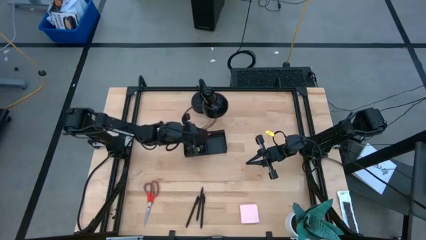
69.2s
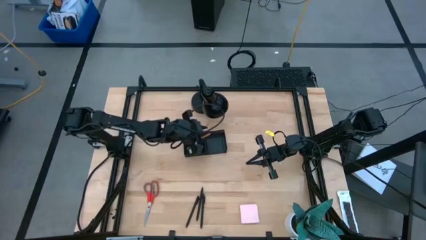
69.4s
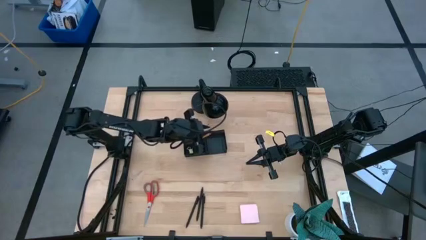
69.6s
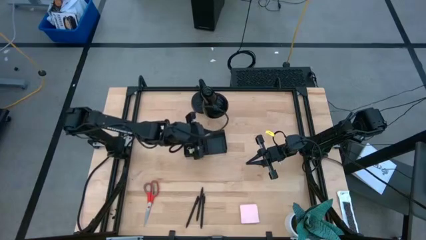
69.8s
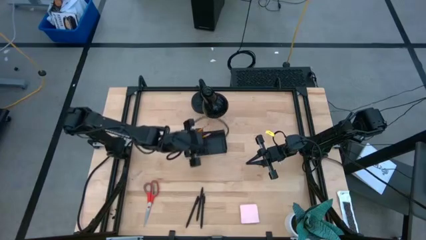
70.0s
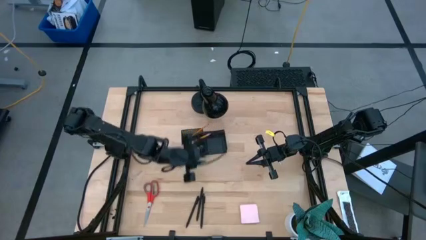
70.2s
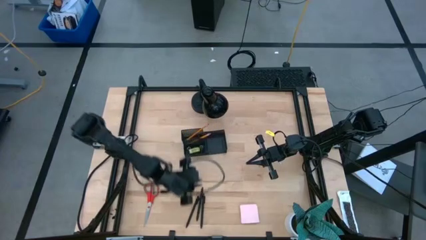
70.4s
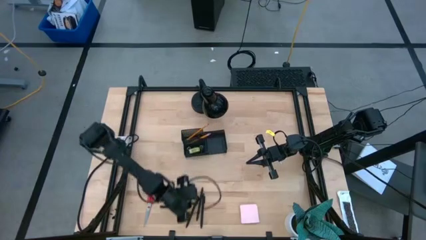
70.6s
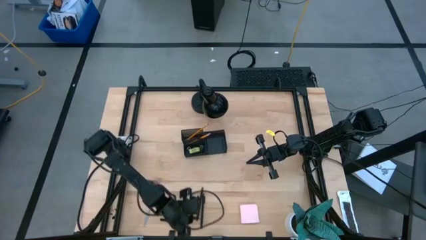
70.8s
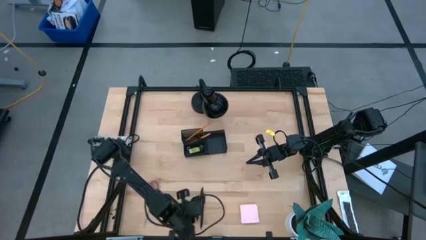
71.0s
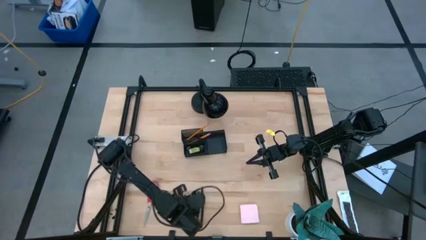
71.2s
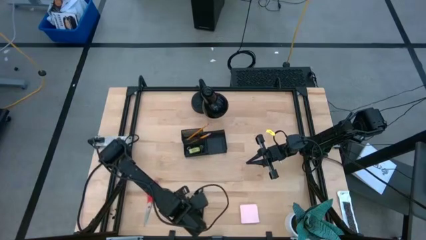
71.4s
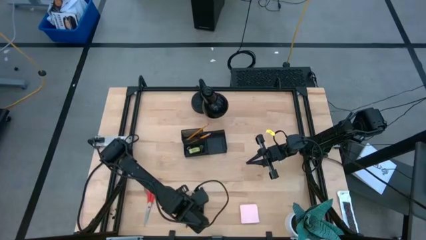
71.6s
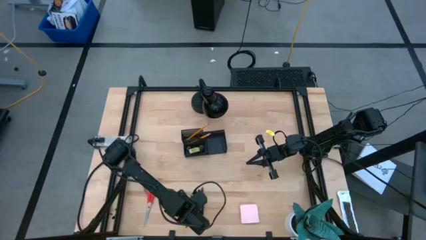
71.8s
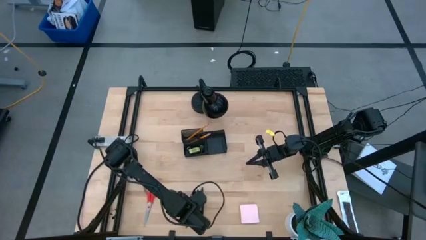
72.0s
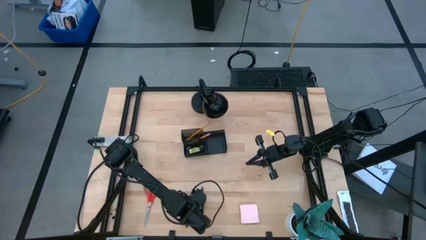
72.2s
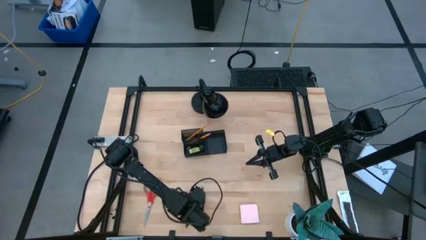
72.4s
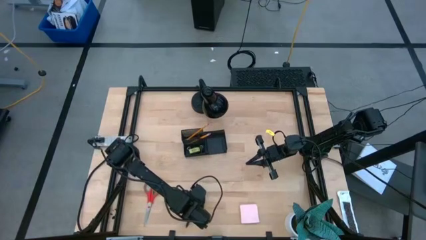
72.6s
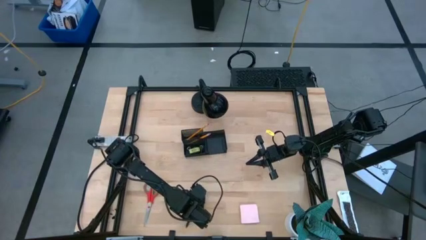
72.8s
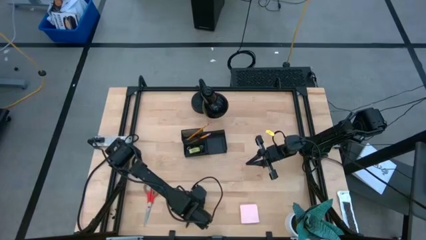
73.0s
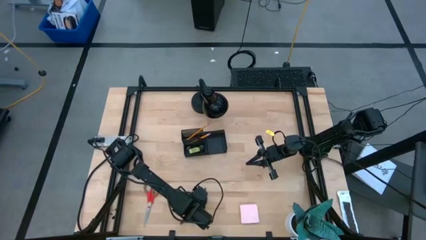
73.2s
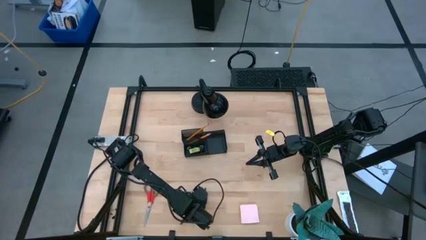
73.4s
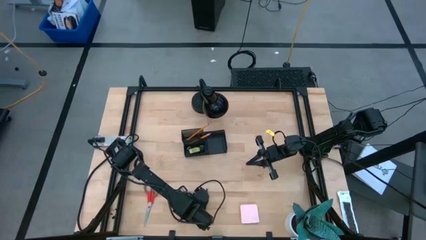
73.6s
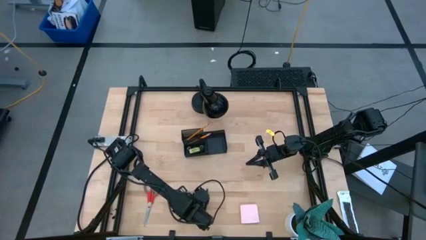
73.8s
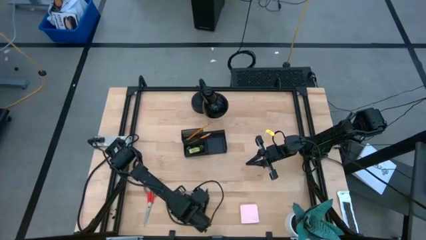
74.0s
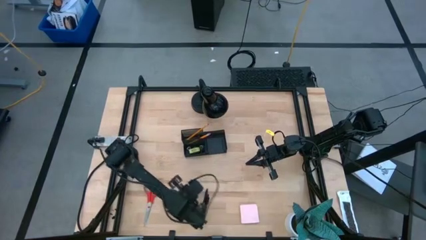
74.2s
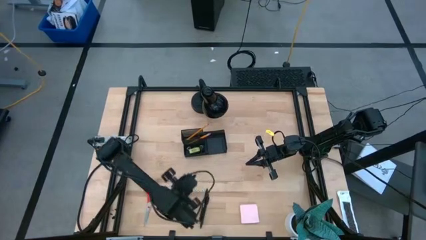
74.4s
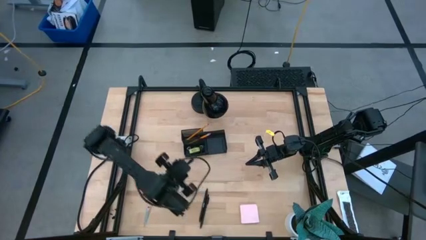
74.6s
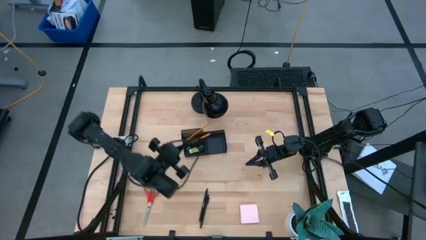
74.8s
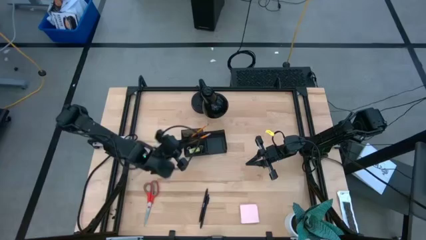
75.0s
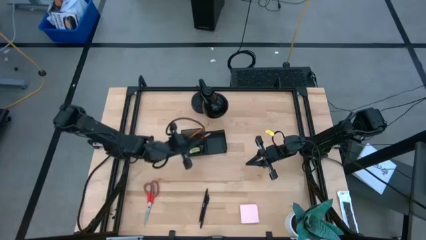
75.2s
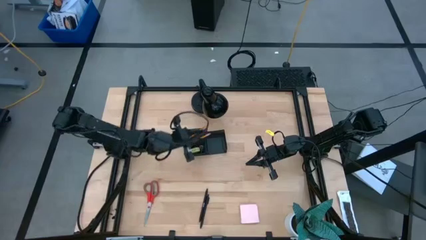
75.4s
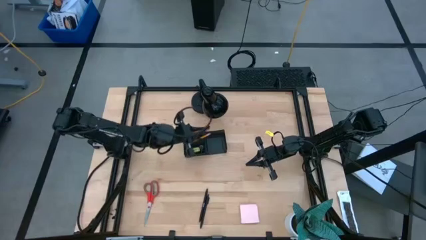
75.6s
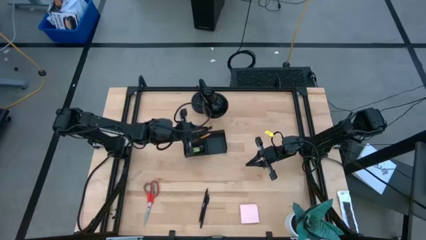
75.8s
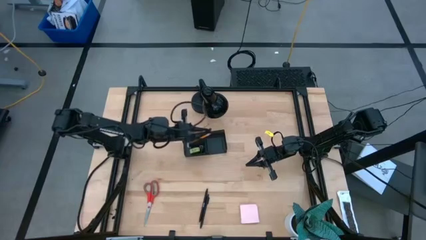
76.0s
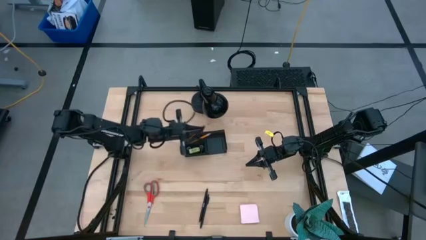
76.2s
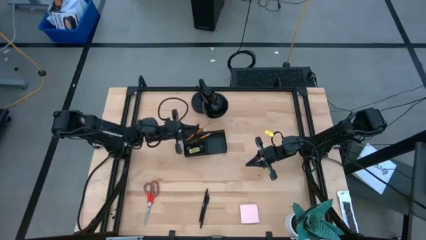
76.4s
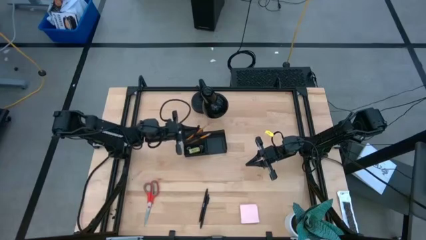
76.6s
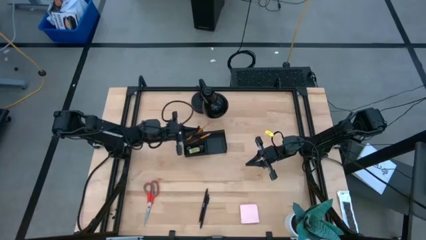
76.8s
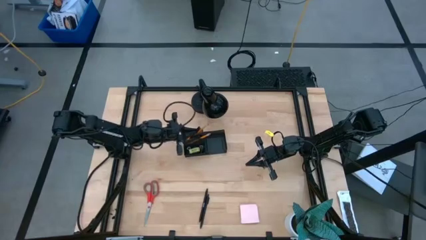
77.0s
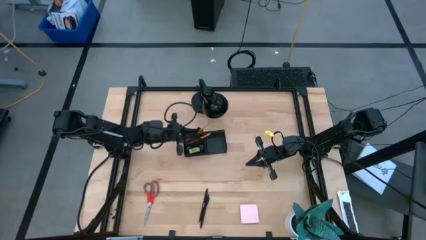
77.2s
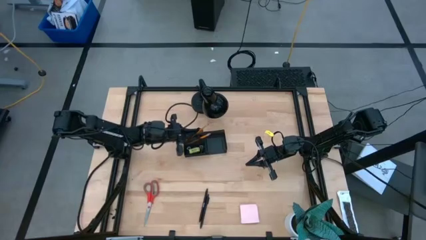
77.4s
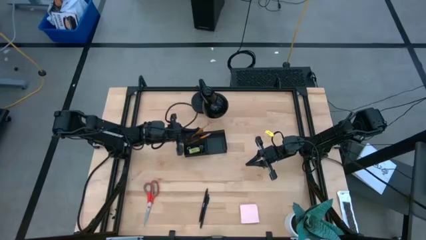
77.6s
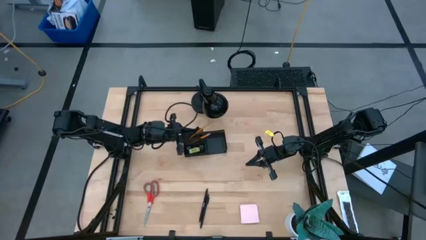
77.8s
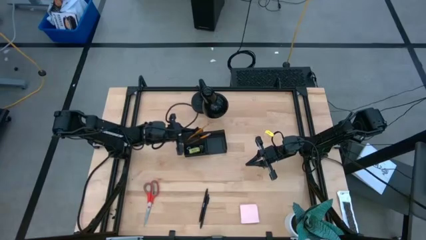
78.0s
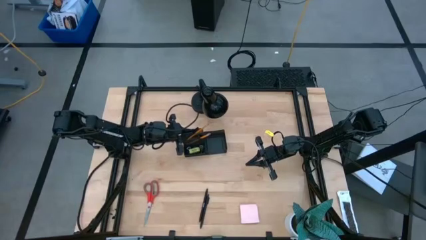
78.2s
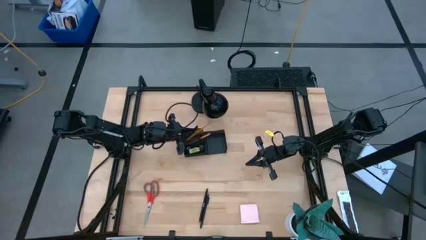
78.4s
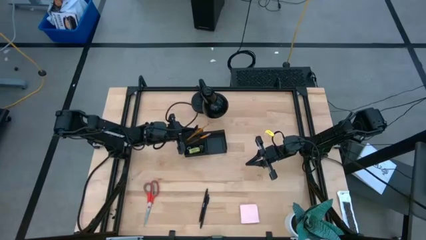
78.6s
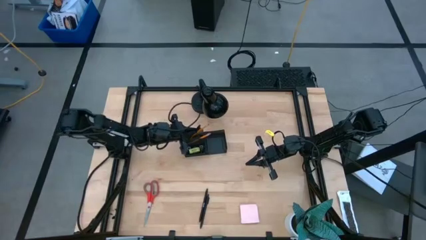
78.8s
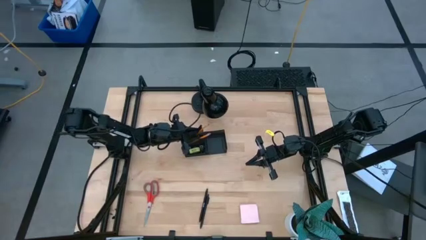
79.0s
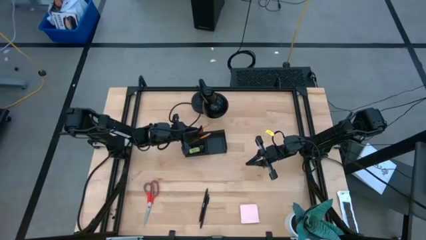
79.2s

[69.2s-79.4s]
Task: Pick and place office supplies into organizer
Put the black pen into the black desk organizer

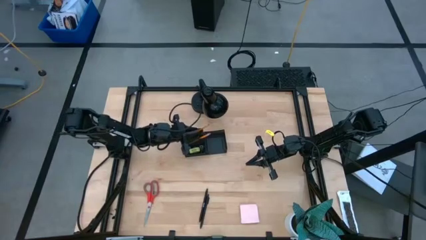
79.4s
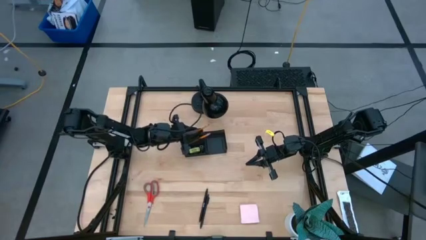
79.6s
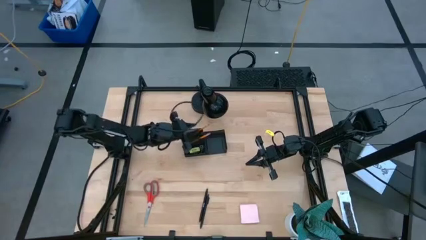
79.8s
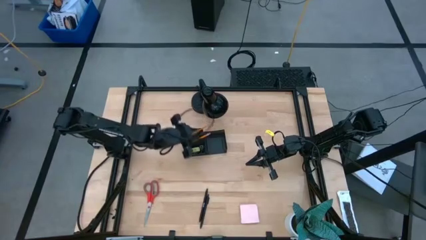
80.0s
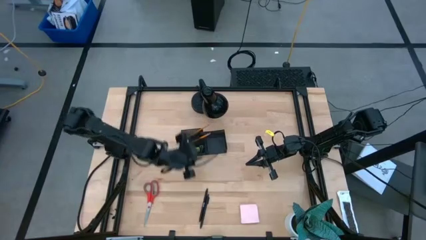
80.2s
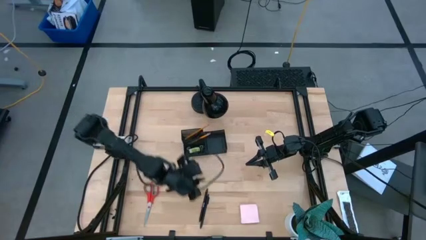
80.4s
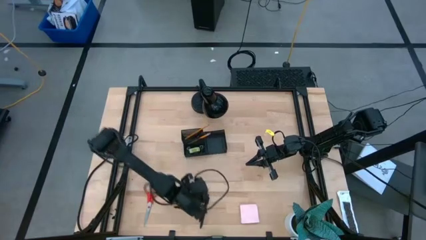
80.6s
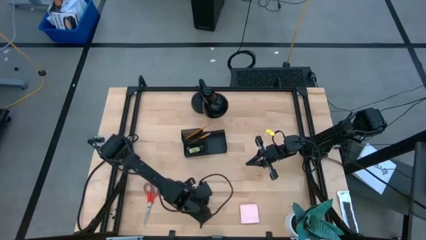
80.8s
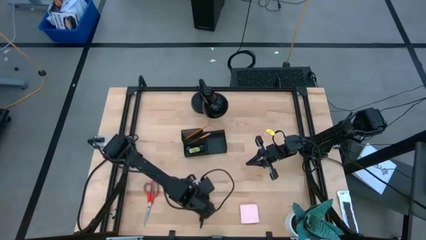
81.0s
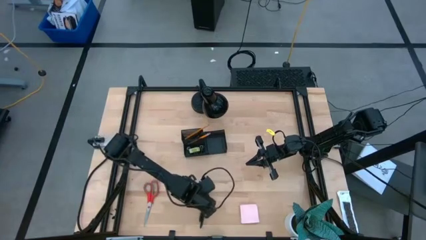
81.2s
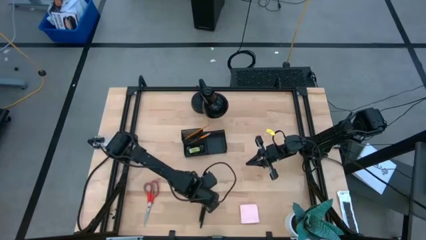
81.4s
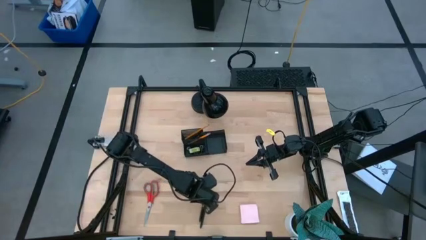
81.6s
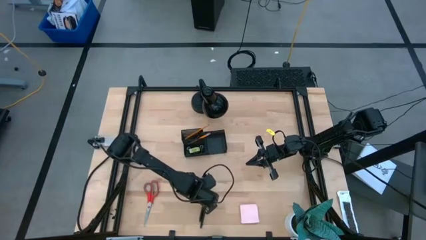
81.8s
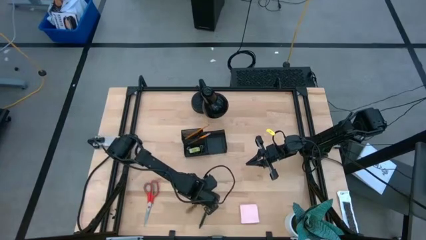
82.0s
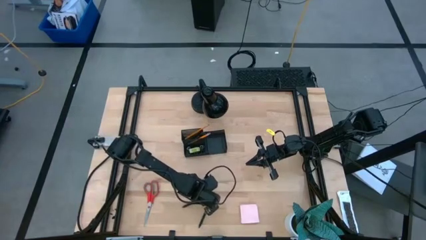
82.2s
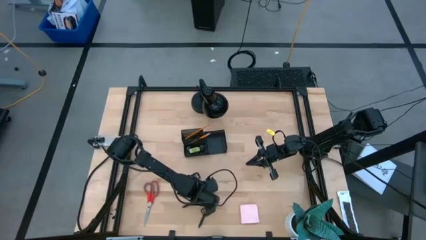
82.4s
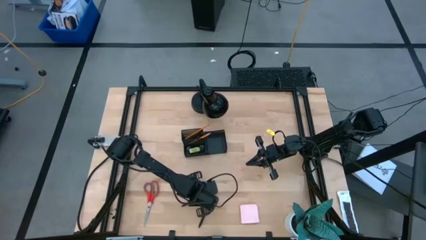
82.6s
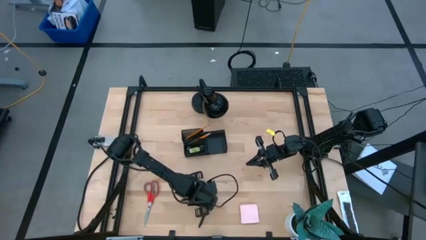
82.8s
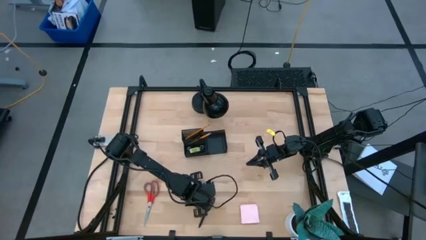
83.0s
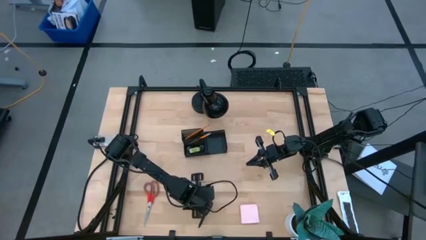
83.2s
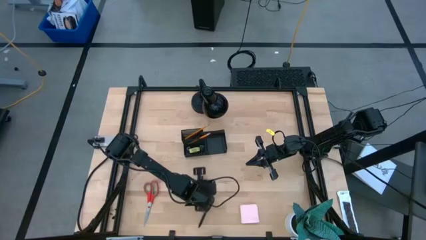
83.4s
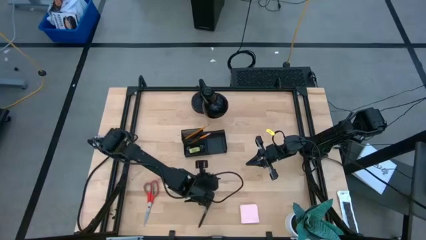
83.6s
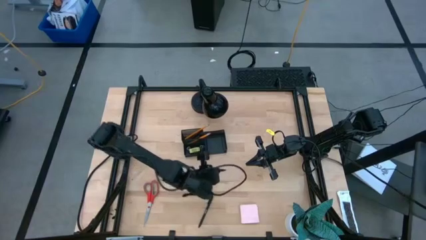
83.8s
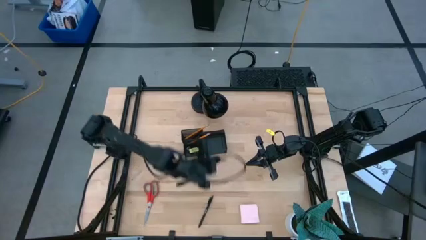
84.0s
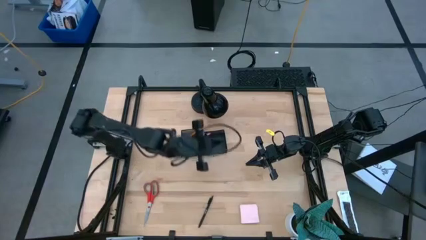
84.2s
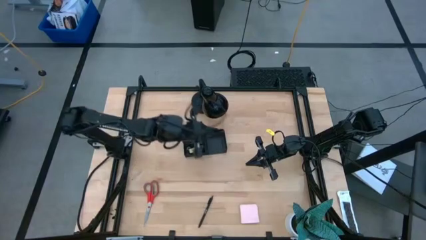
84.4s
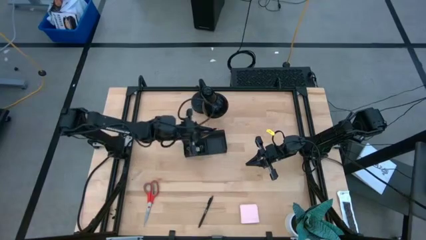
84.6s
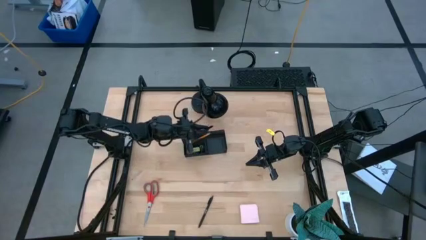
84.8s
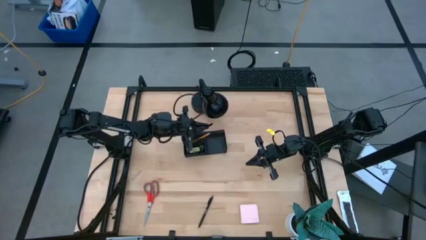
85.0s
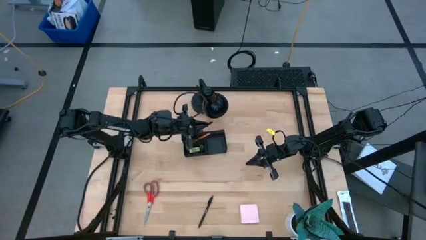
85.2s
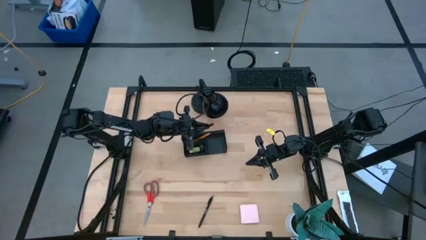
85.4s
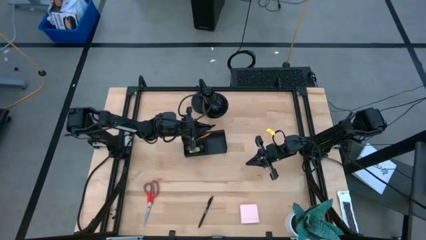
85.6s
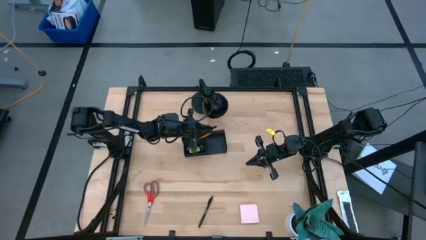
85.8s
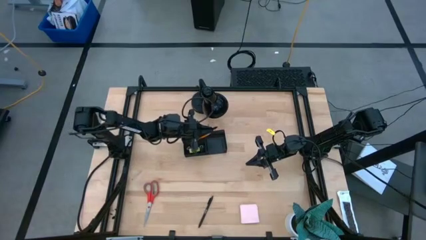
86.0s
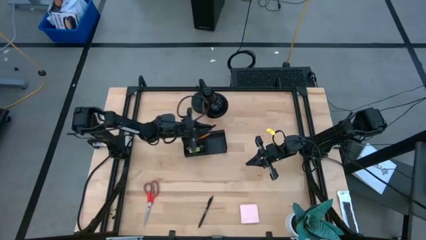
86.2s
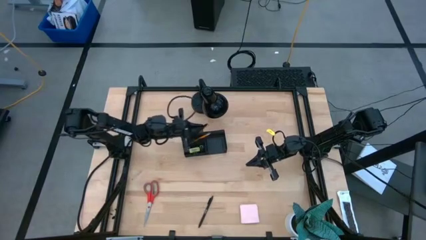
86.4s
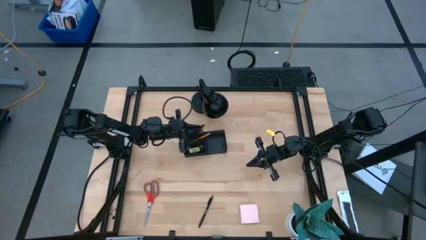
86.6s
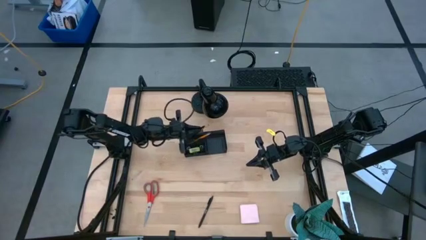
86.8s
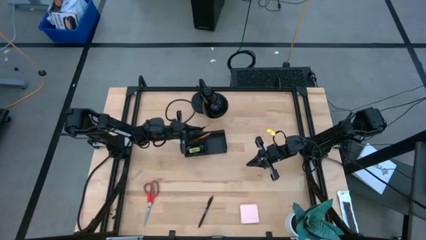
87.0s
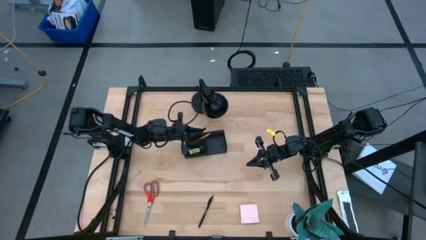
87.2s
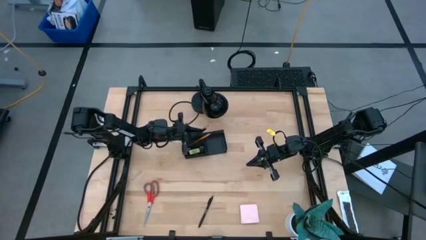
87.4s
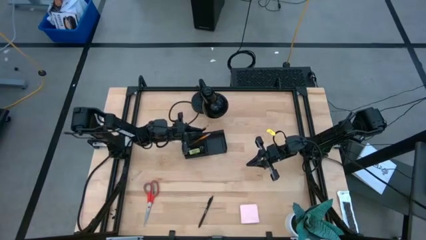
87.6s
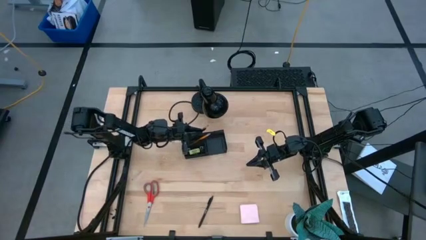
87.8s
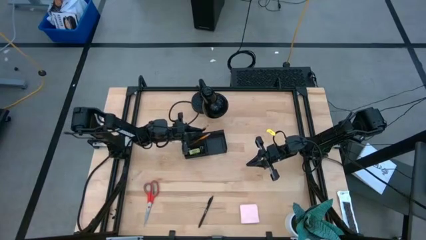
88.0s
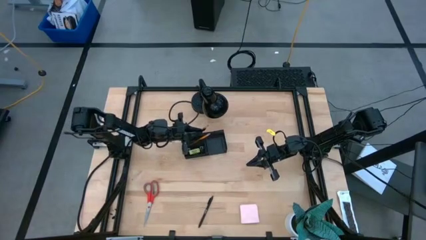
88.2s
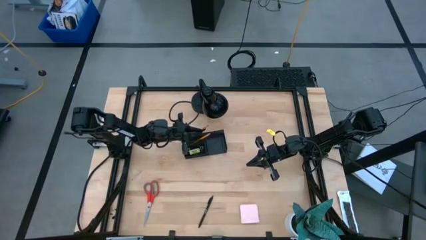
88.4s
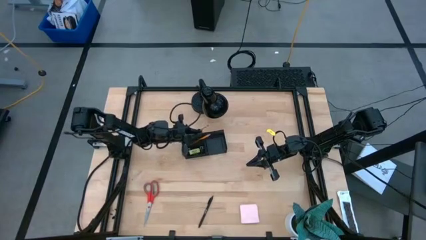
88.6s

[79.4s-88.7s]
Put the black pen into the black desk organizer
